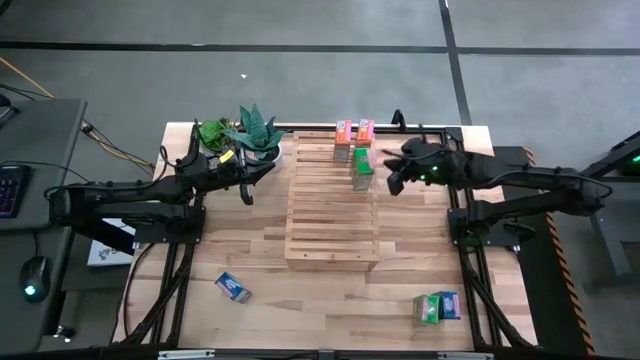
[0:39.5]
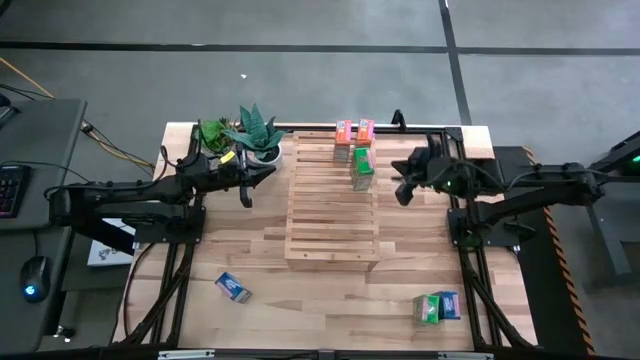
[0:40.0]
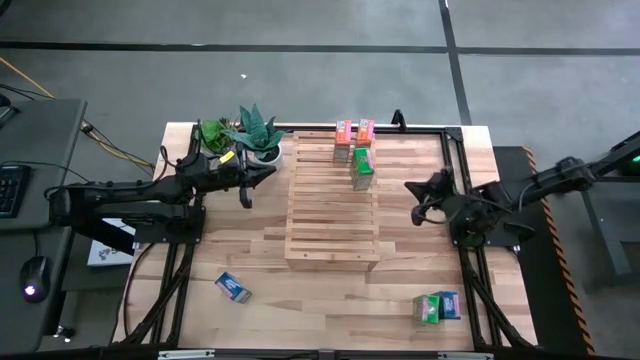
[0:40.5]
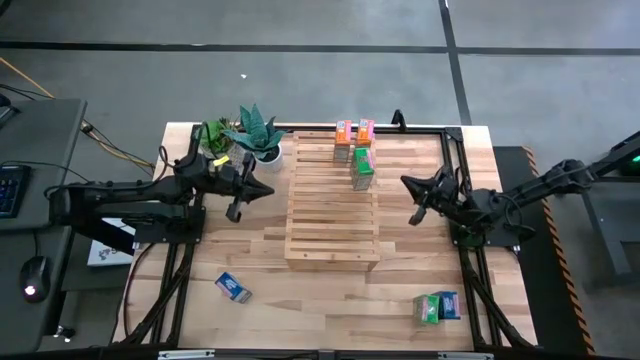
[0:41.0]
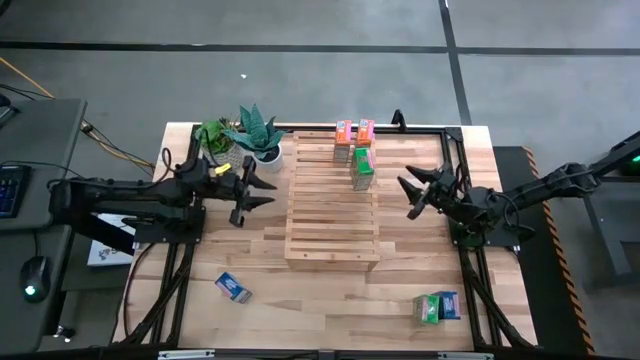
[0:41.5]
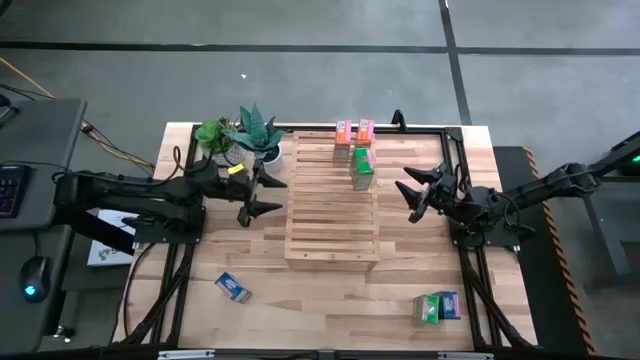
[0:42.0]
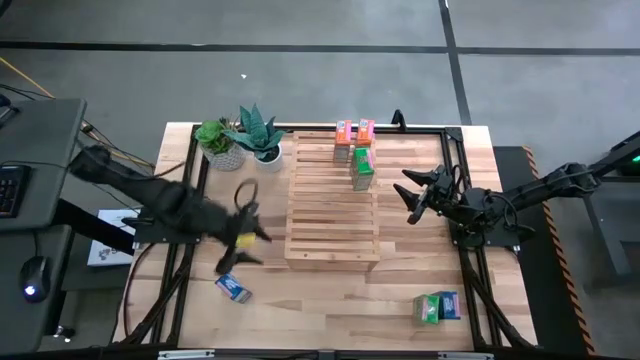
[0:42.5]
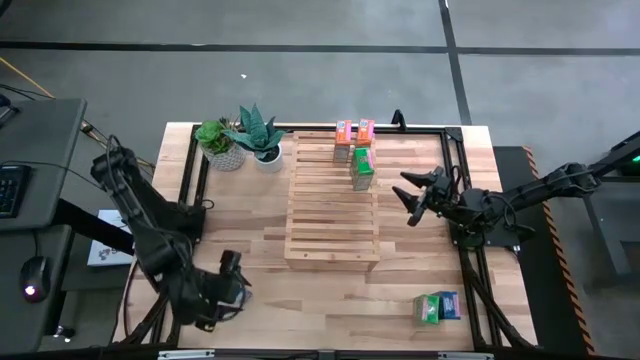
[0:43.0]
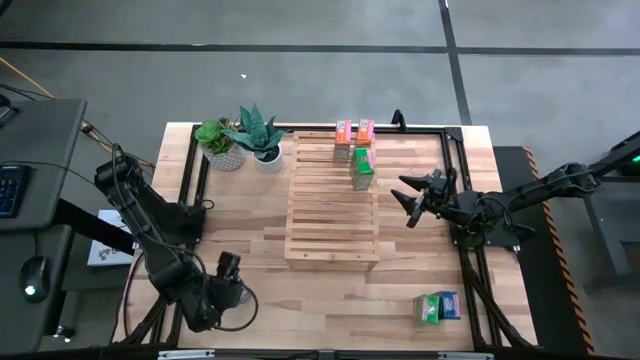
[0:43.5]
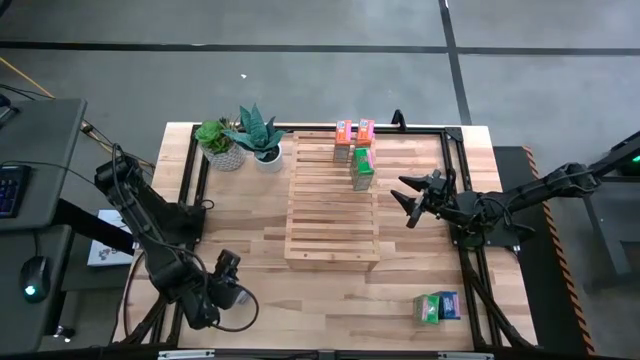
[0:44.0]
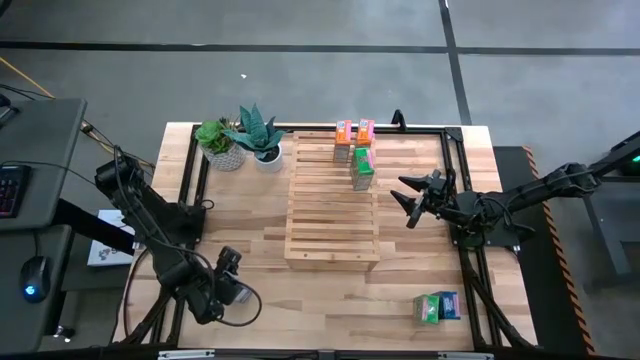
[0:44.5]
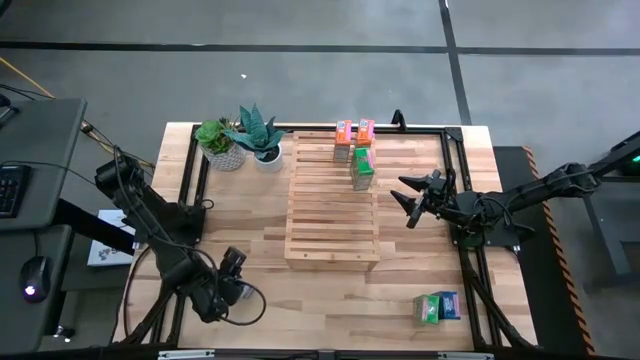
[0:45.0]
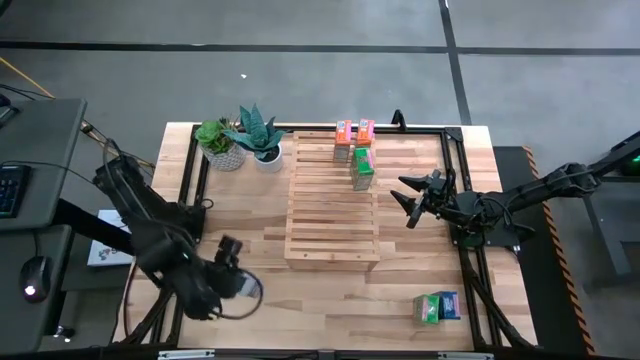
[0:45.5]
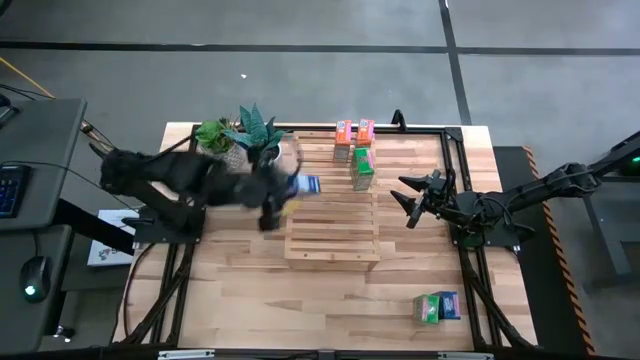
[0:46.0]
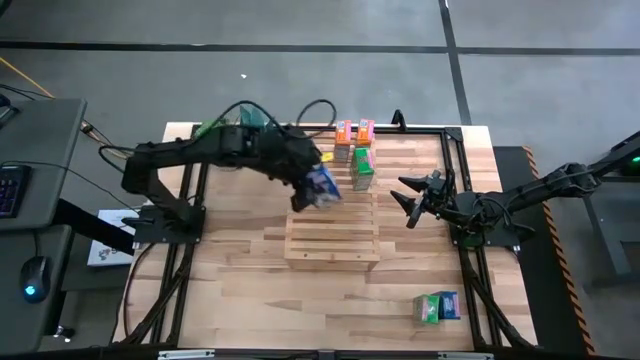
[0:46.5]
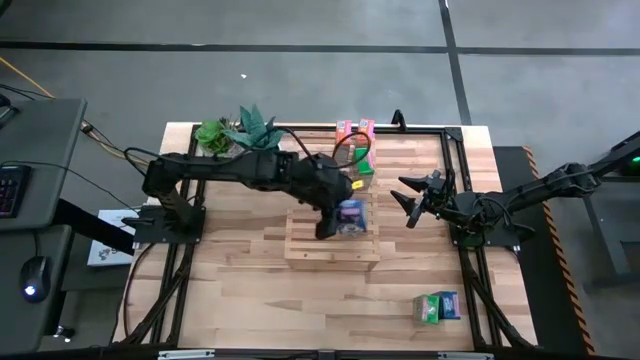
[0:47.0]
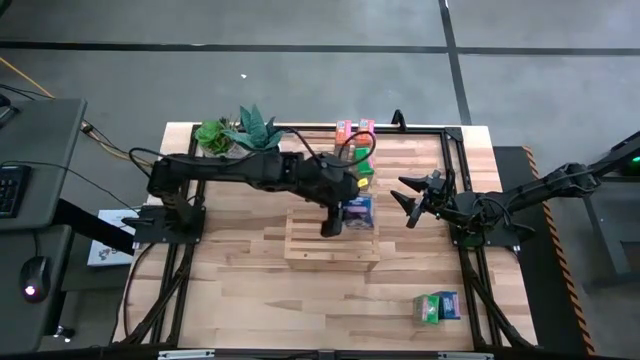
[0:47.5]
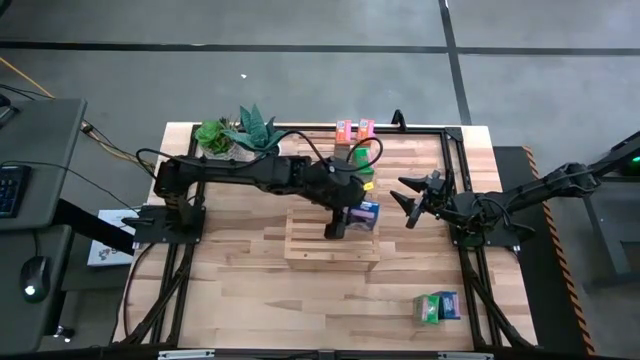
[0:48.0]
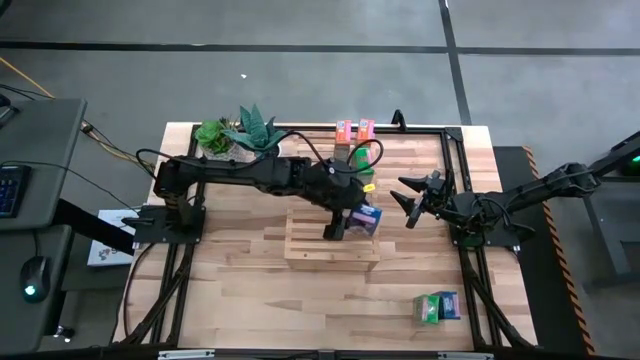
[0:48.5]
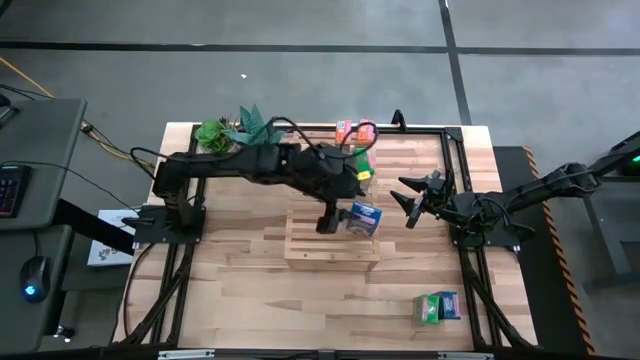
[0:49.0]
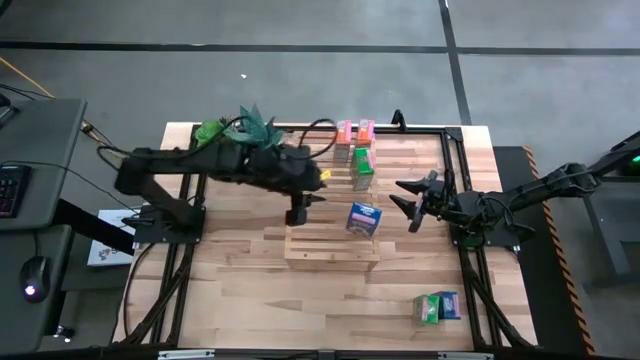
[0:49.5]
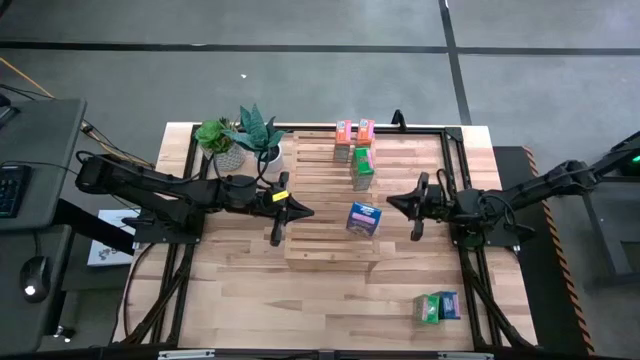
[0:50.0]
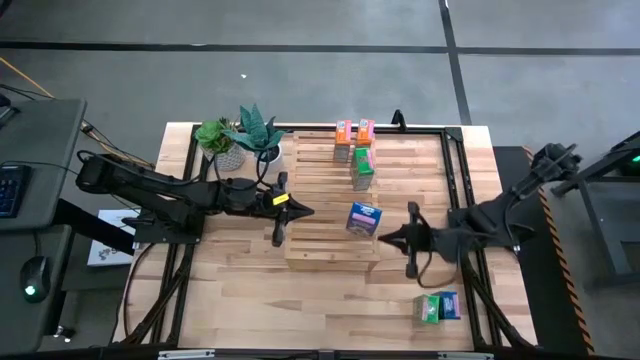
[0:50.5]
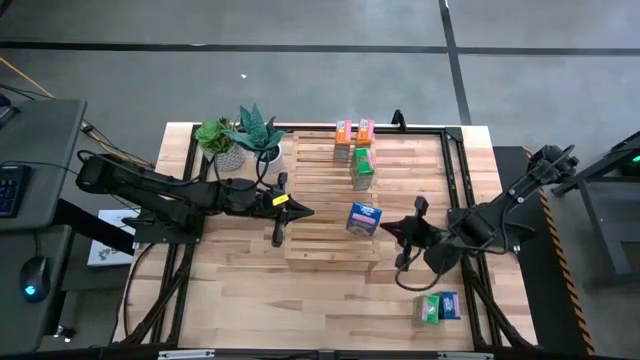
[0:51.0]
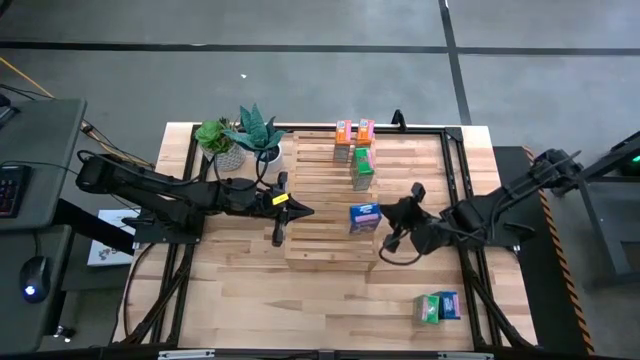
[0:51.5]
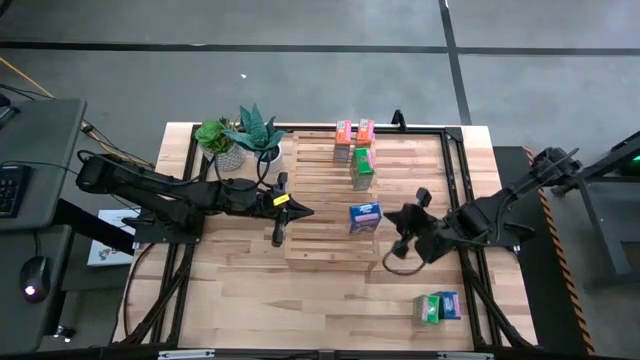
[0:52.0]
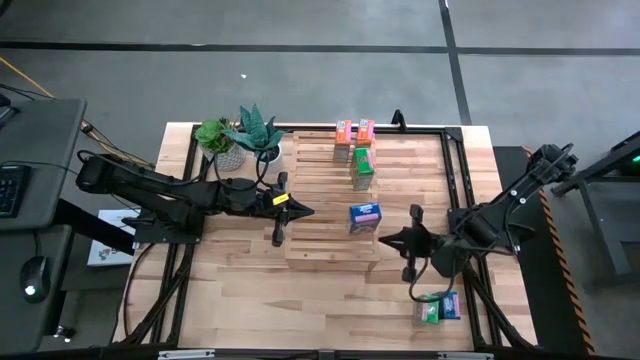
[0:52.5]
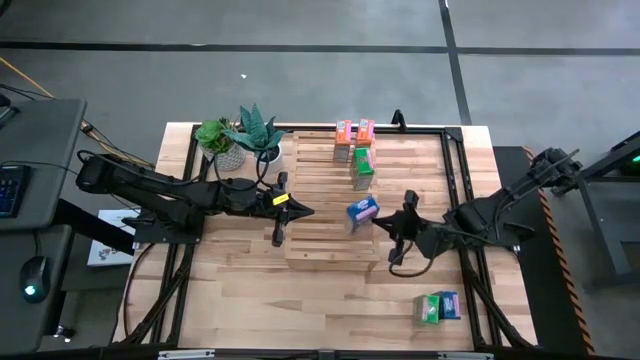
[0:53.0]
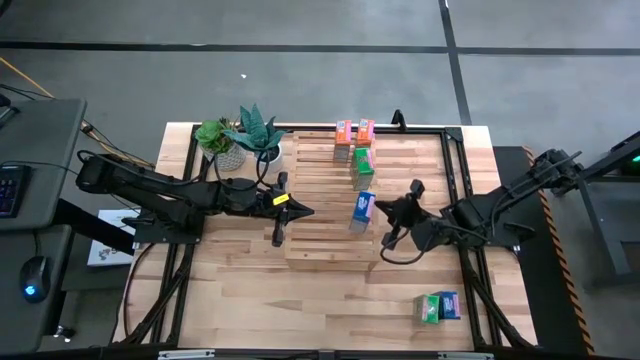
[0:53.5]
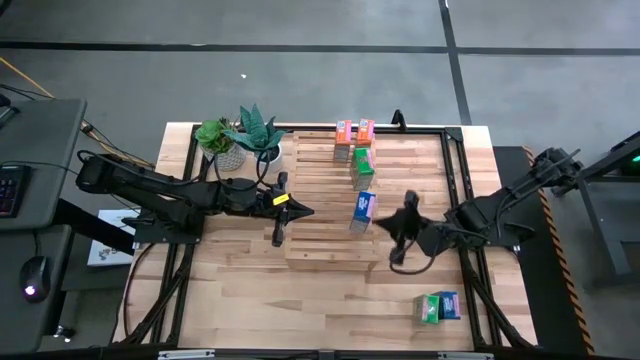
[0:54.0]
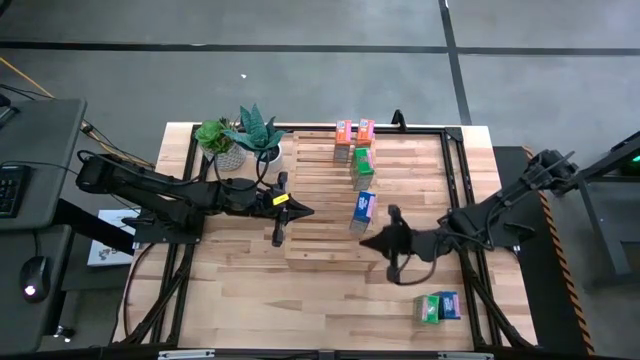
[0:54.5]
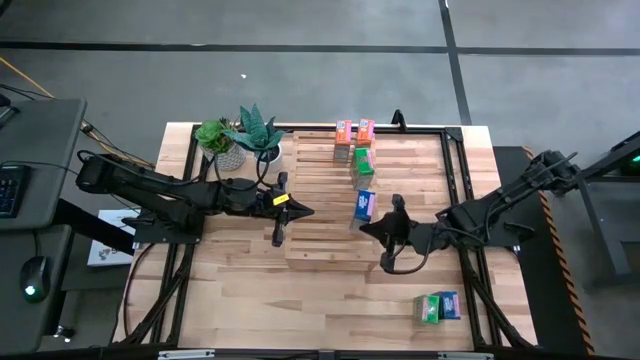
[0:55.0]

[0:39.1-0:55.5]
Task: Stack cereal on shelf
Put the left blue cereal box on the shelf

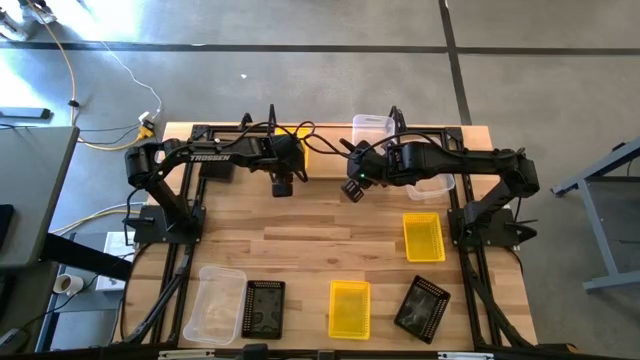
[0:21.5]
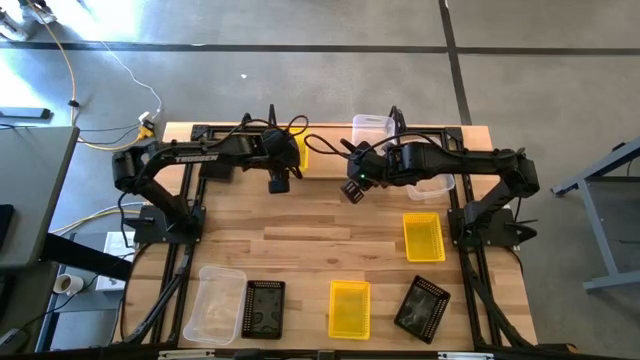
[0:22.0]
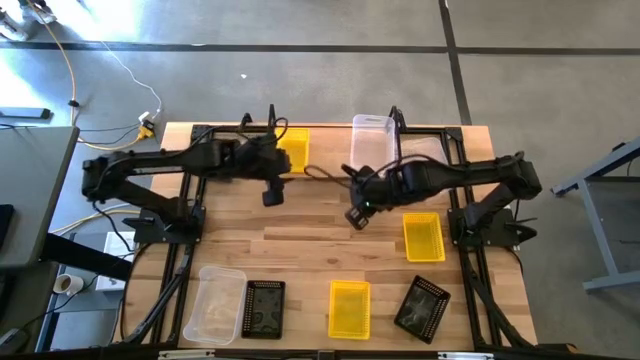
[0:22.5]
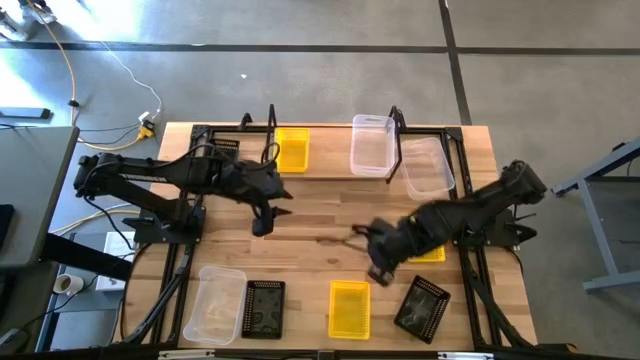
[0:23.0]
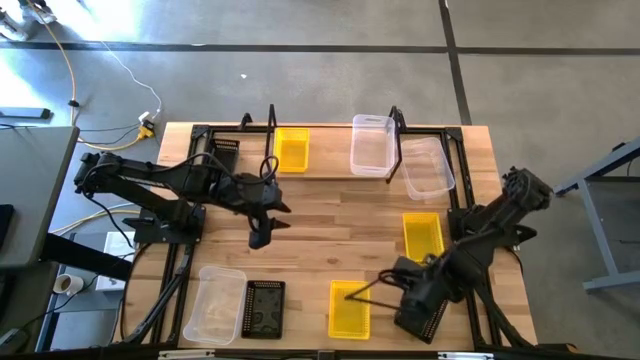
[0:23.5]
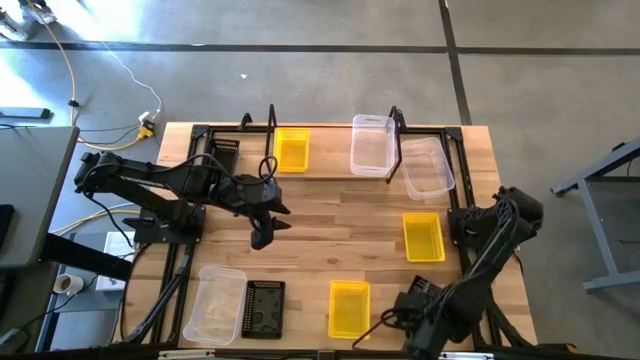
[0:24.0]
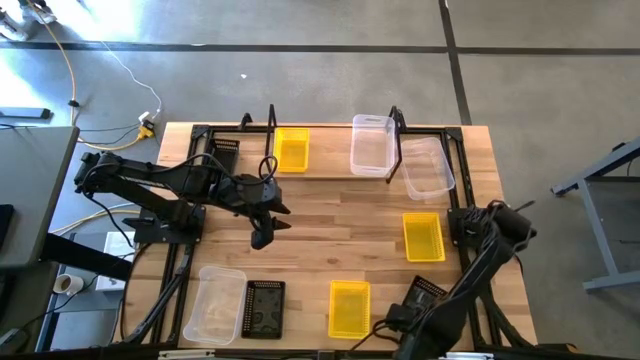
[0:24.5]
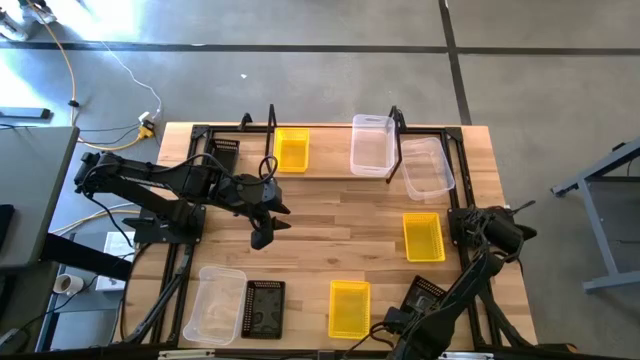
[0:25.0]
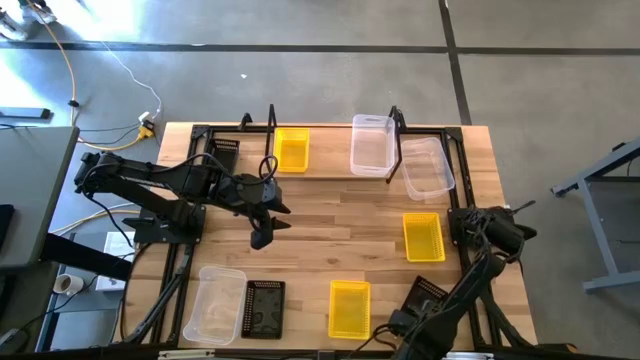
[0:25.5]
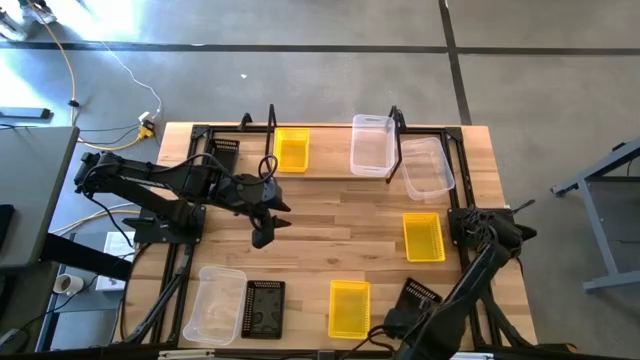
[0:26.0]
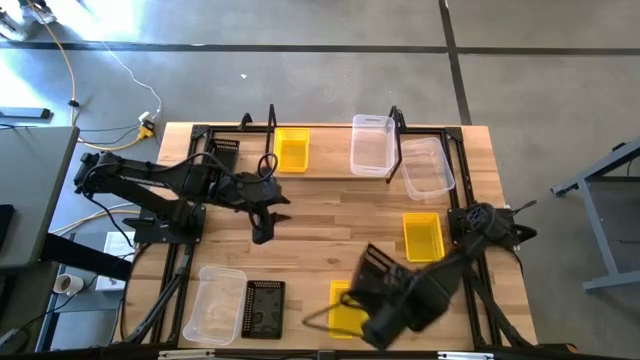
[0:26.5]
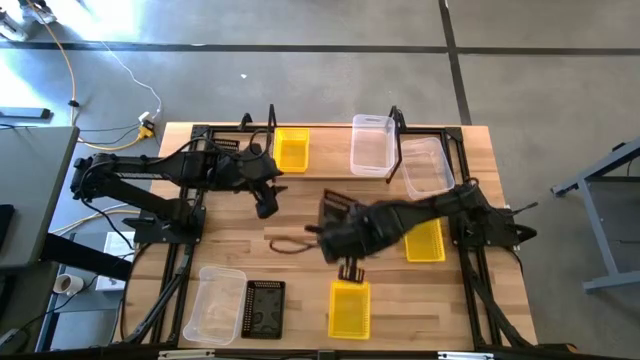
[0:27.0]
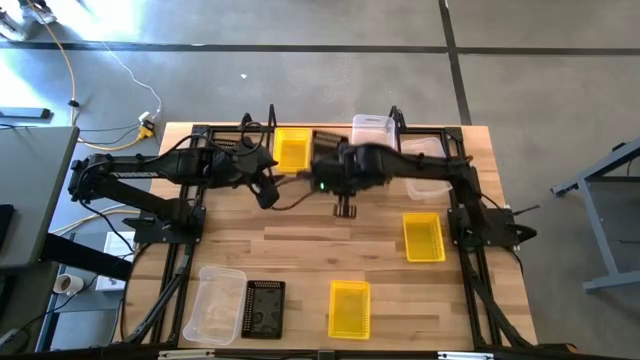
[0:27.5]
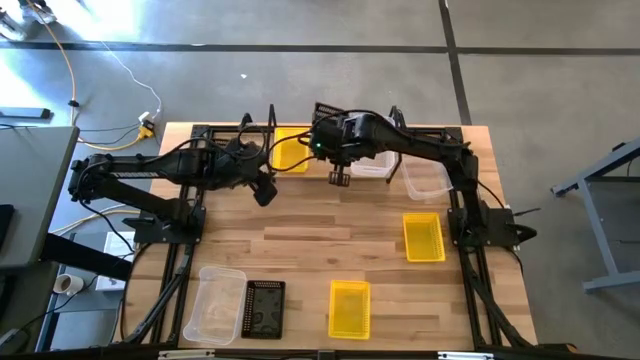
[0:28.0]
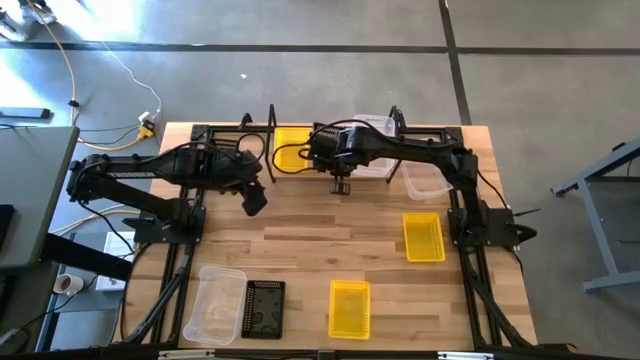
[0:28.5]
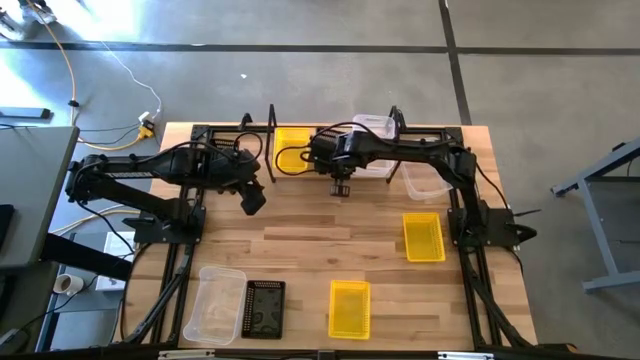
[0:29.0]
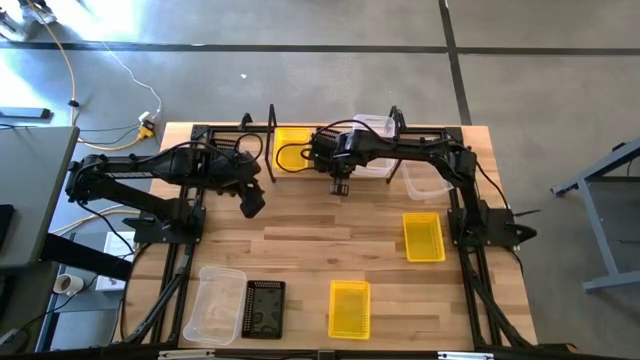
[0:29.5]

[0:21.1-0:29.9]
Task: Stack baskets on shelf by color
Put the right black bin on the shelf
